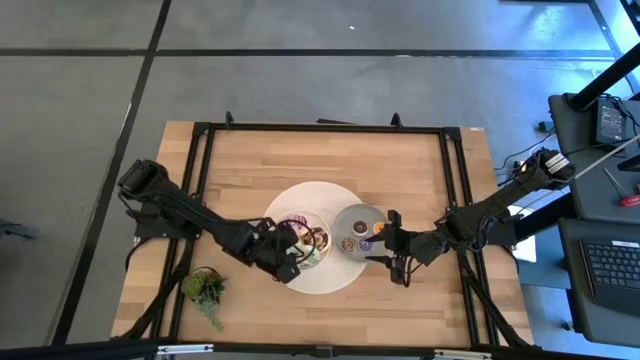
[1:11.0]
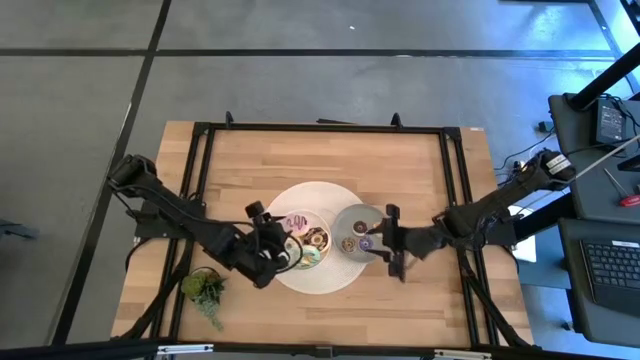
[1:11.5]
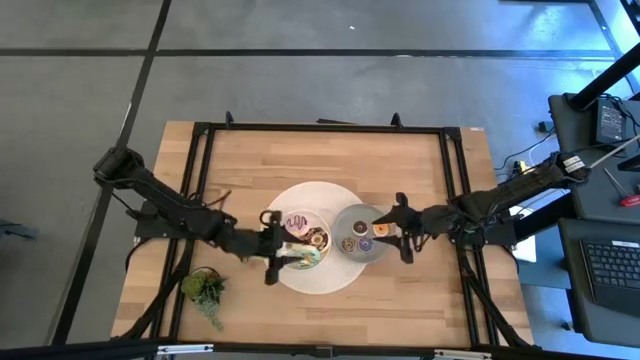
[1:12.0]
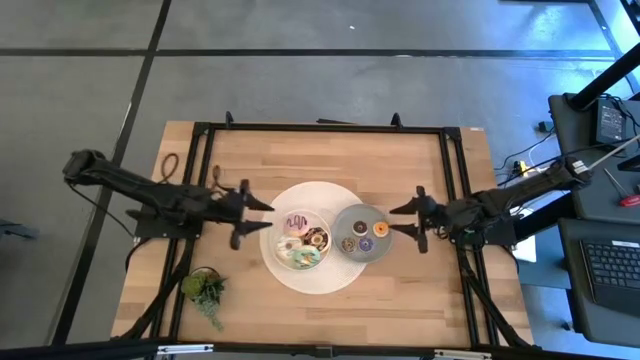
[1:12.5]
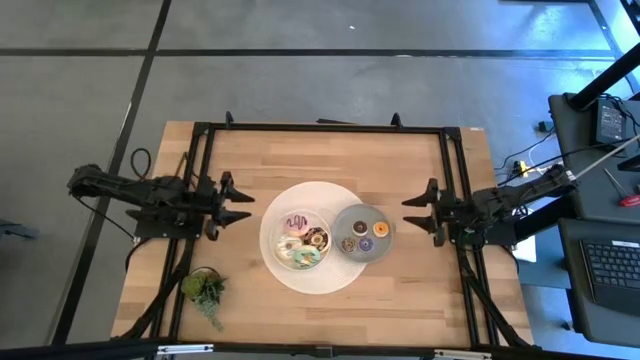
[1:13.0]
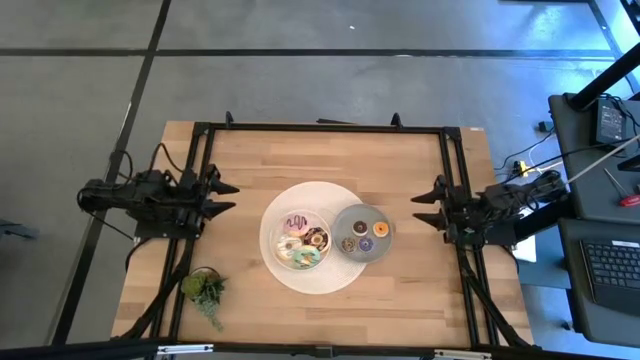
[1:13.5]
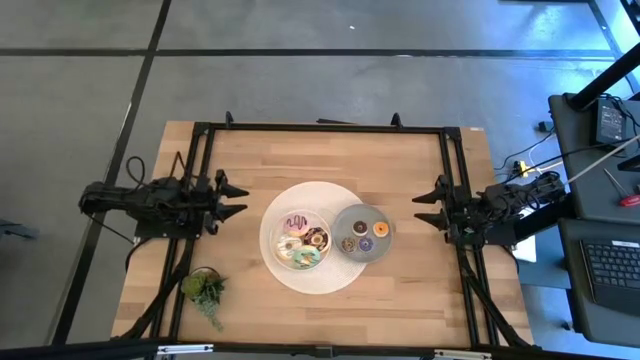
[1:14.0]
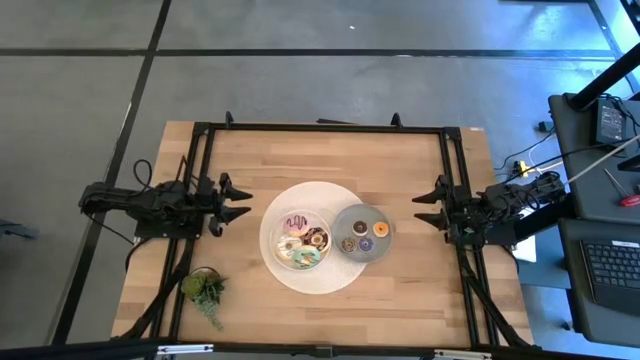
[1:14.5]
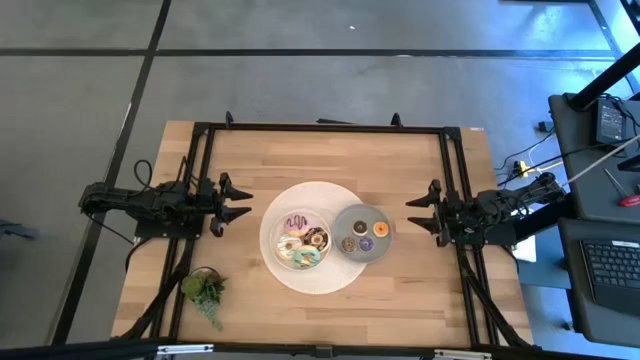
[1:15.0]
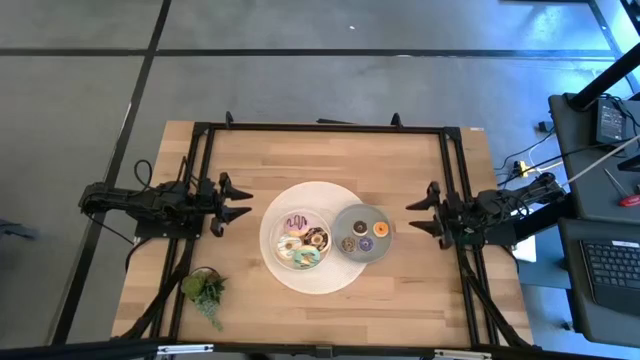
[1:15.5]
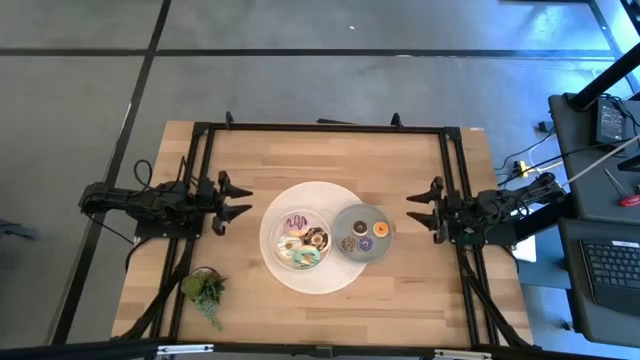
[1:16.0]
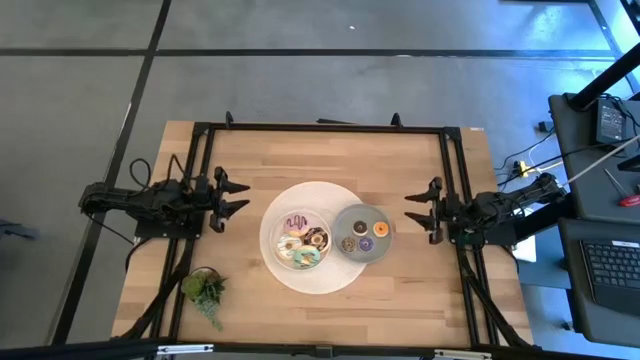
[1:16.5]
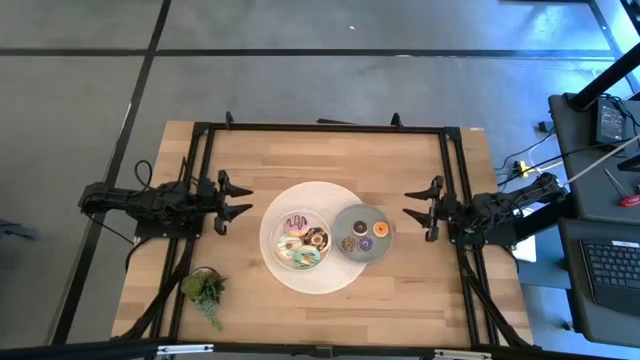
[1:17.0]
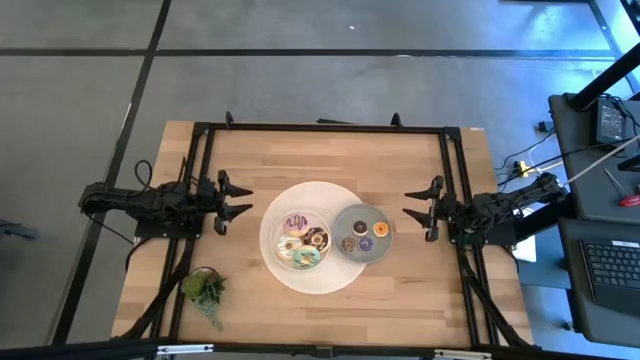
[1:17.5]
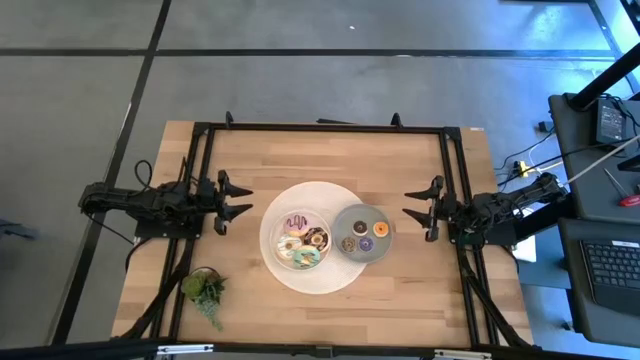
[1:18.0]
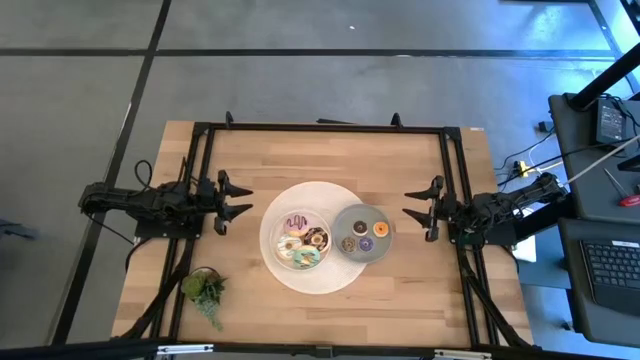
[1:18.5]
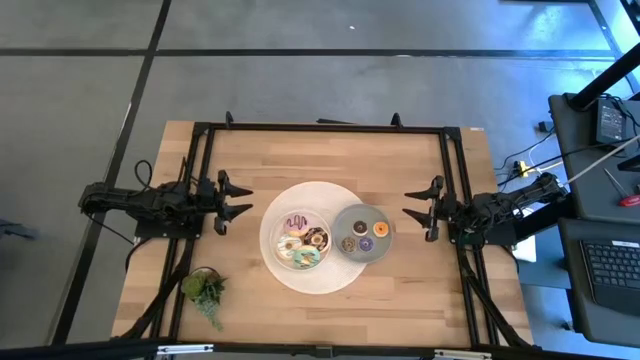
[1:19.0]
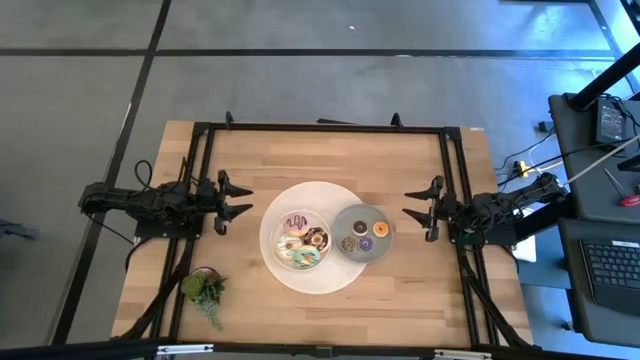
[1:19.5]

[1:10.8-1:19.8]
Task: Pick & Place donuts
Return to Home Position

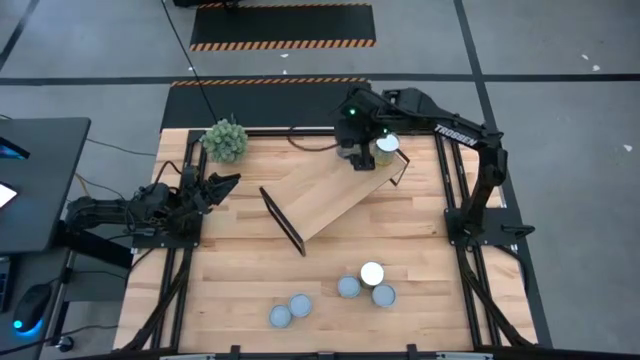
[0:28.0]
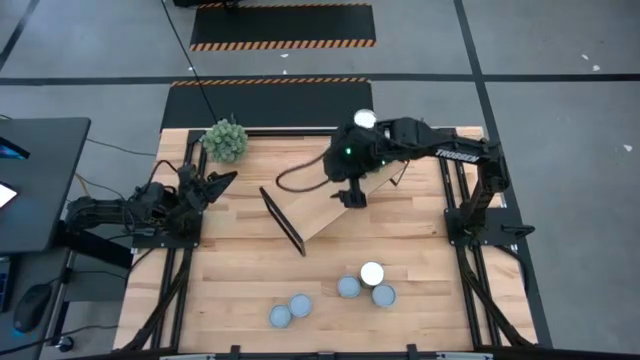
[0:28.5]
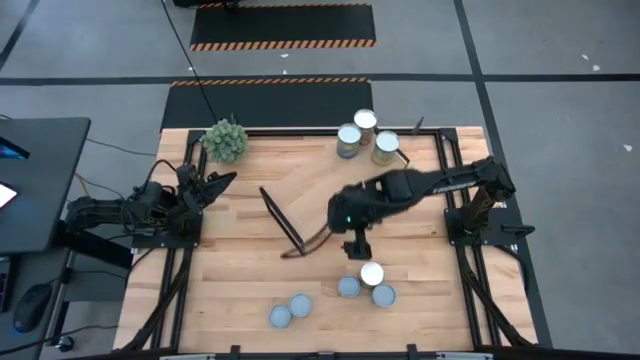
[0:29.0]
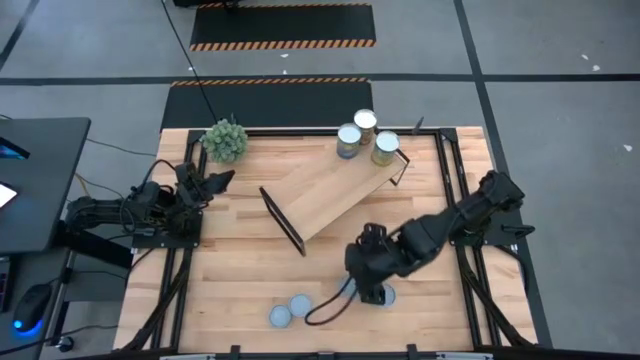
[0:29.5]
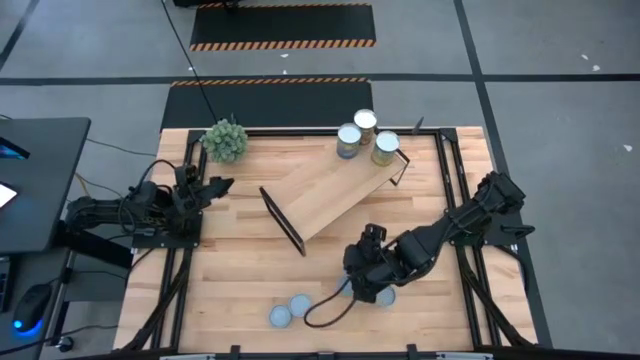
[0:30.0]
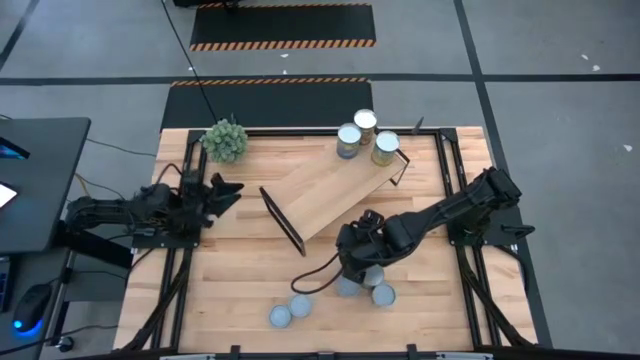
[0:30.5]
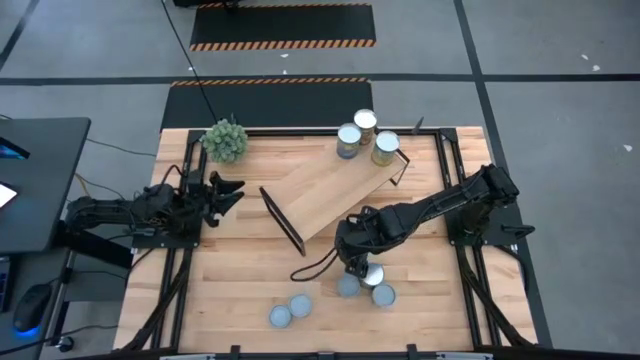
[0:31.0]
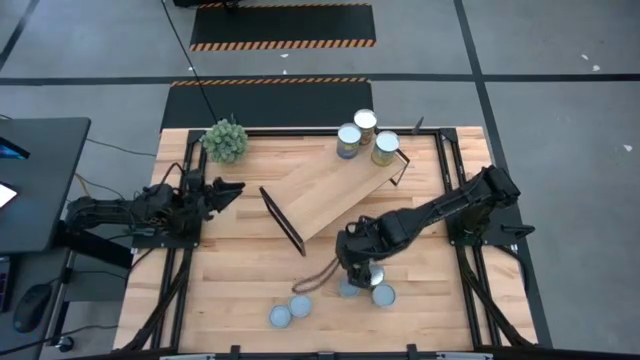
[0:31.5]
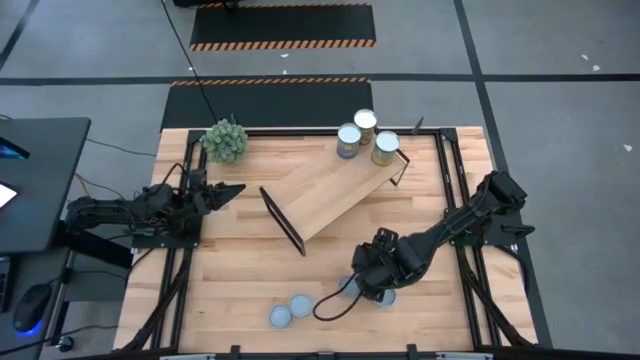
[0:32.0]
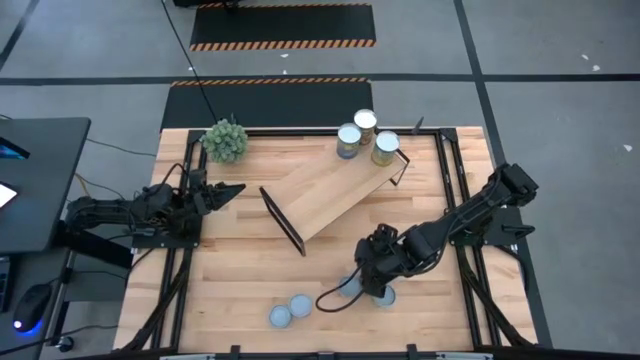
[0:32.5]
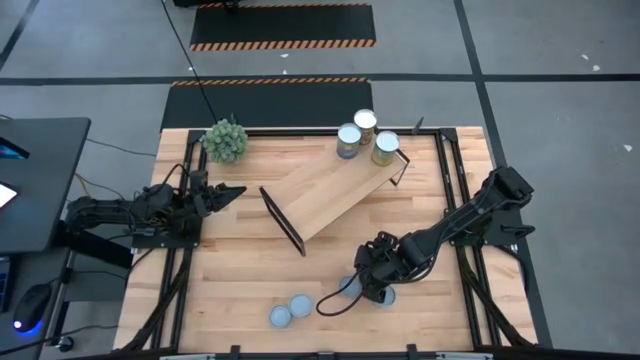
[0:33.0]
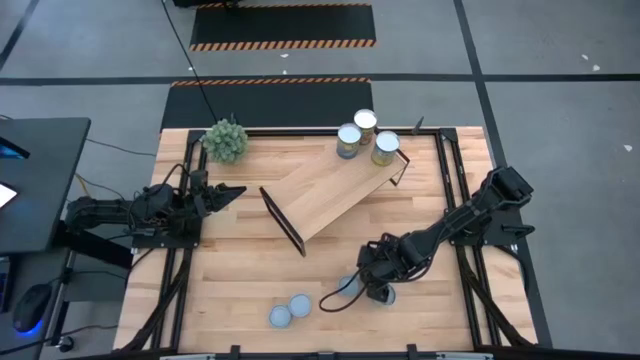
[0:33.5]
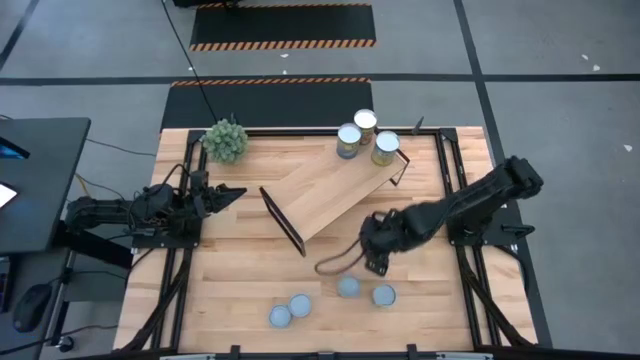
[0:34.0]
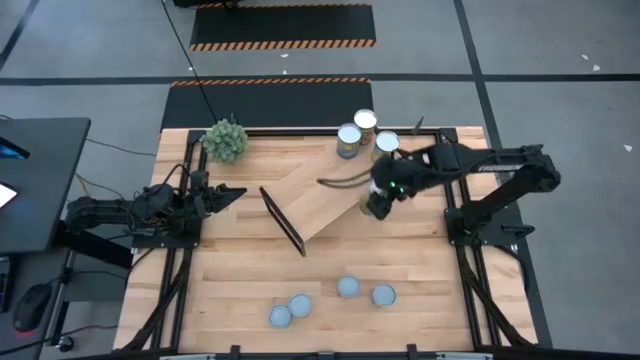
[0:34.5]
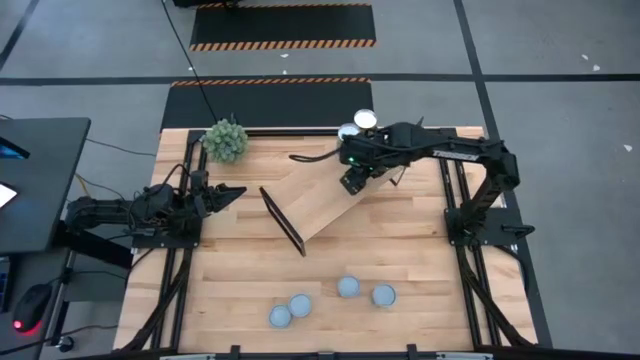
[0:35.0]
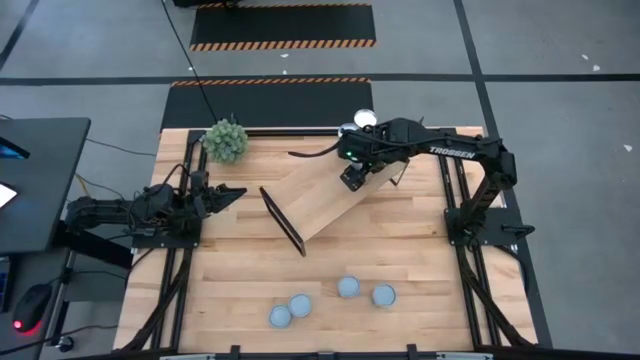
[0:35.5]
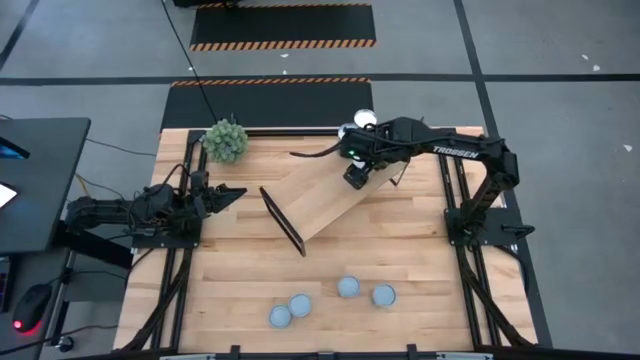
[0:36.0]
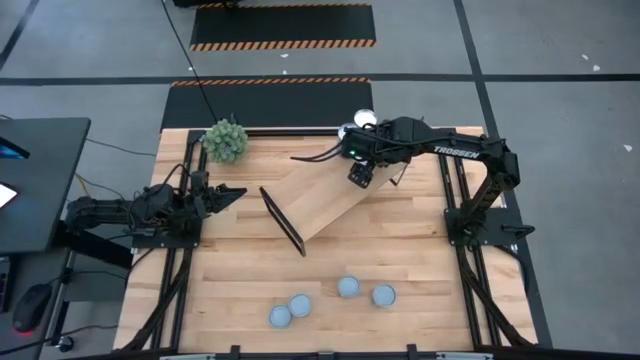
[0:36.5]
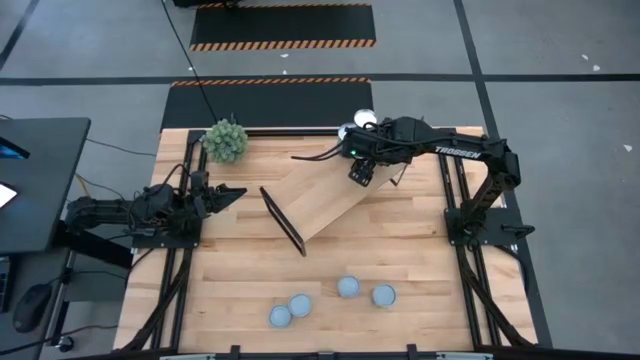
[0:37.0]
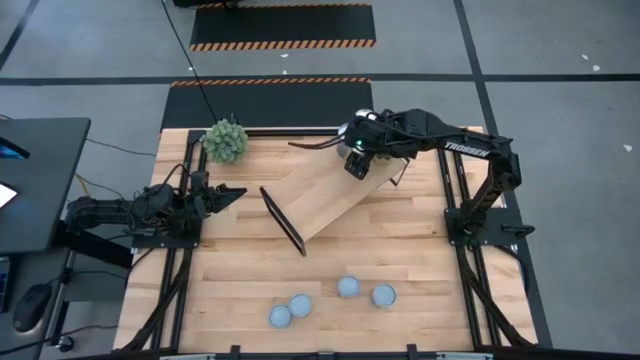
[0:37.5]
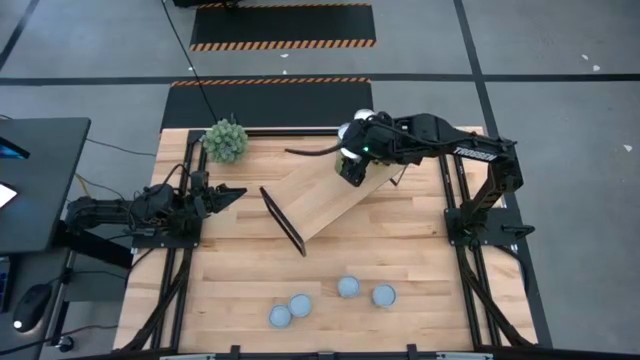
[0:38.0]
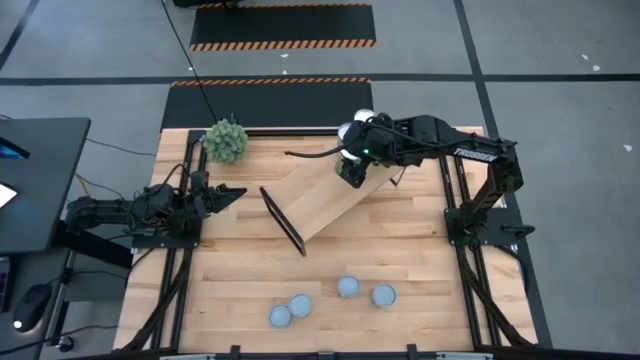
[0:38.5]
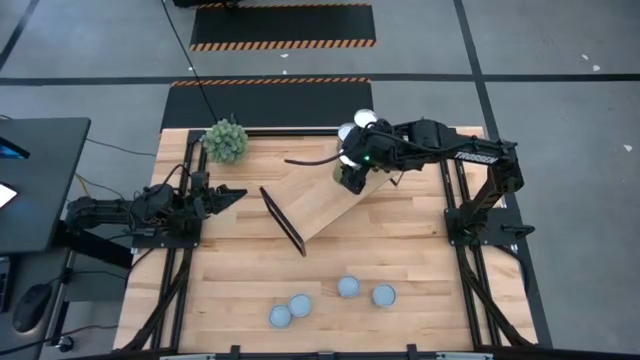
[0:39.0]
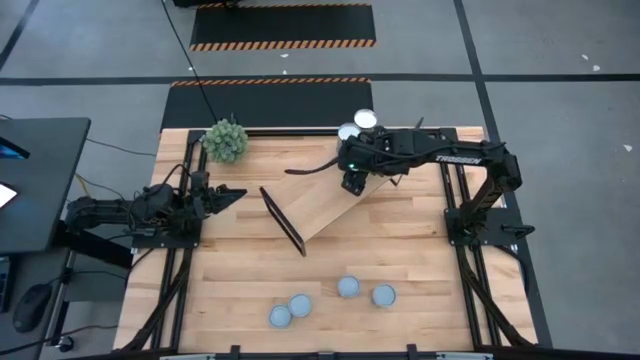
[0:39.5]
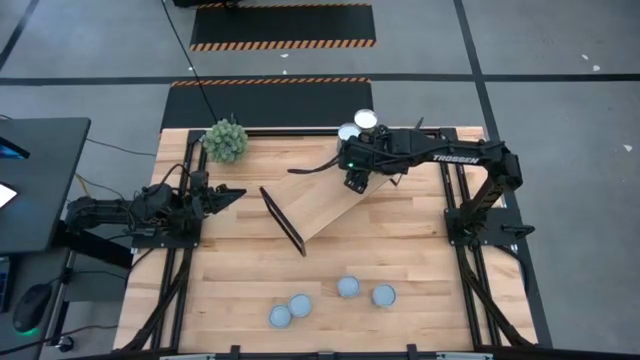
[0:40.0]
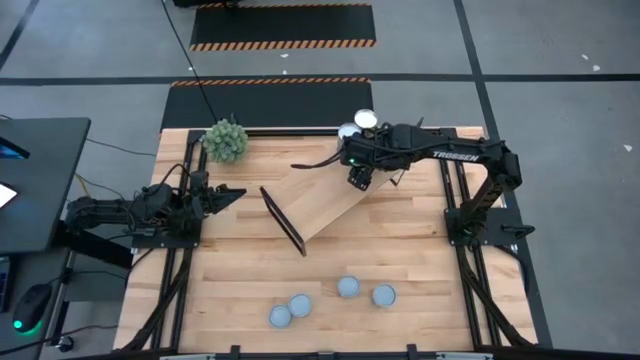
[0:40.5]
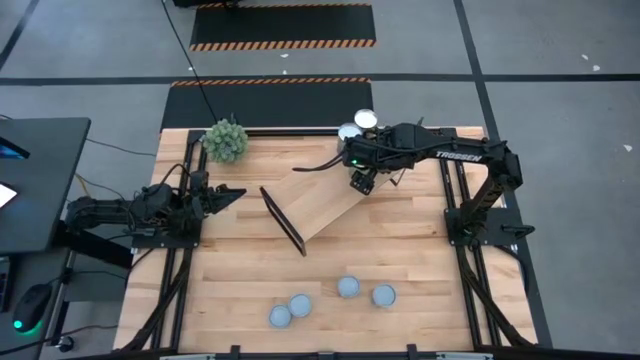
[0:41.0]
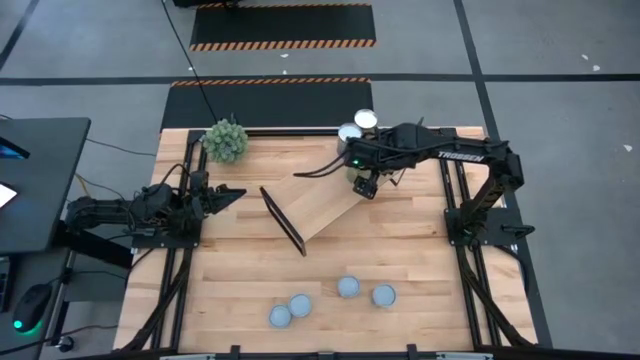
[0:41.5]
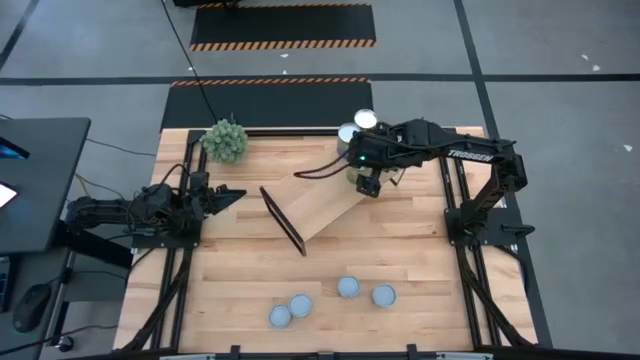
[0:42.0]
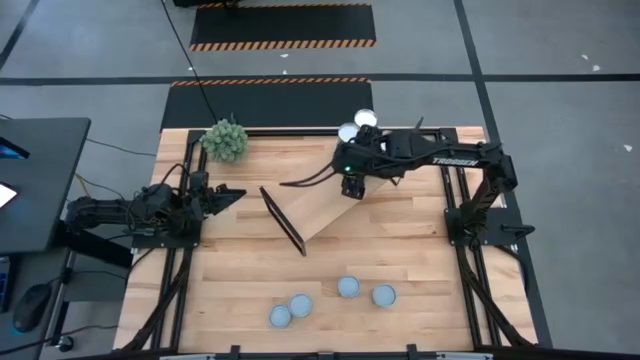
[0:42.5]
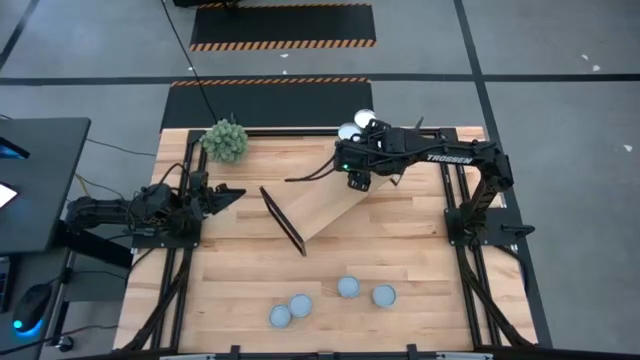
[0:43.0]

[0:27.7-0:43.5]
Task: Pick and place cans onto a shelf
Put the canned oranges on the shelf
